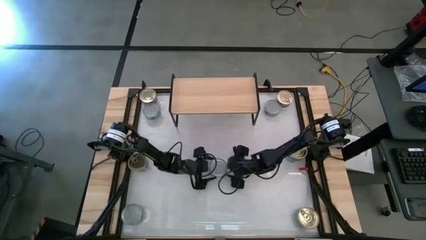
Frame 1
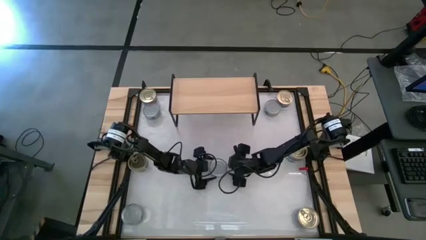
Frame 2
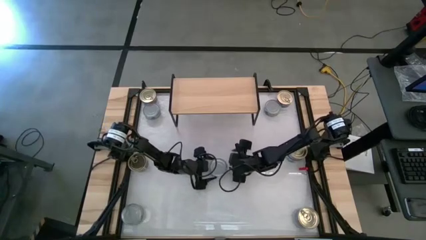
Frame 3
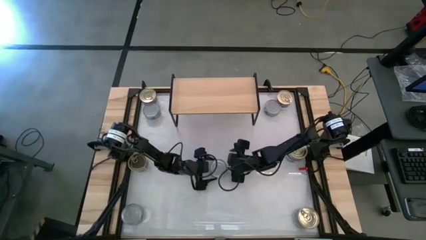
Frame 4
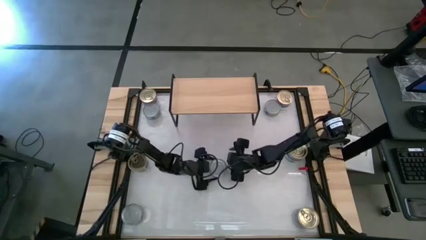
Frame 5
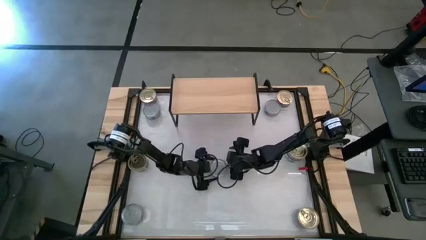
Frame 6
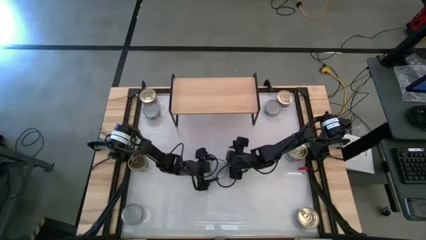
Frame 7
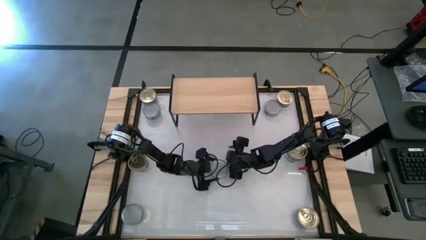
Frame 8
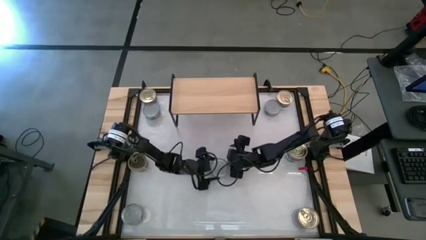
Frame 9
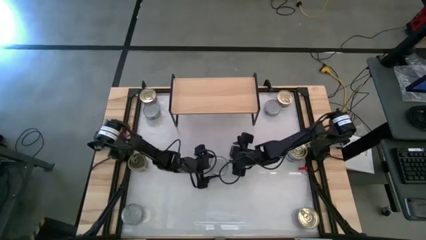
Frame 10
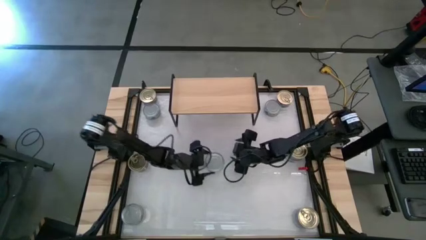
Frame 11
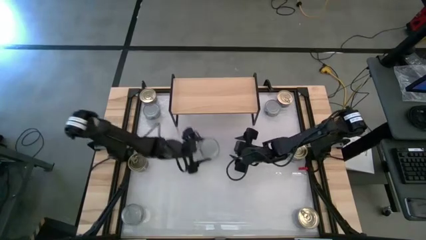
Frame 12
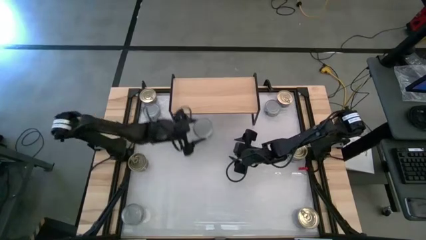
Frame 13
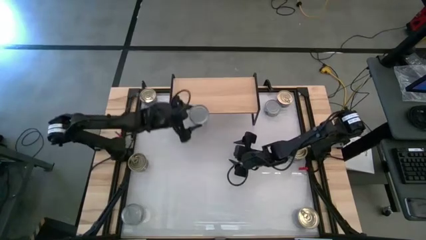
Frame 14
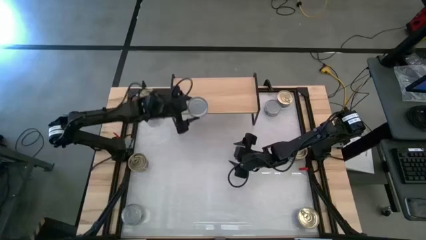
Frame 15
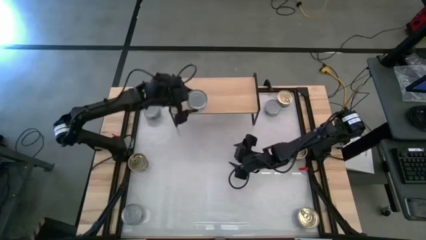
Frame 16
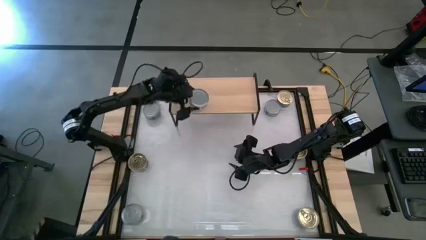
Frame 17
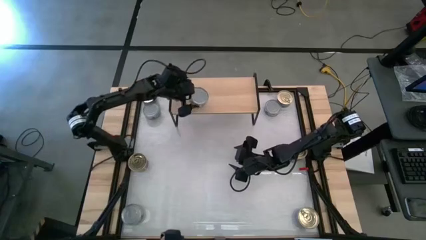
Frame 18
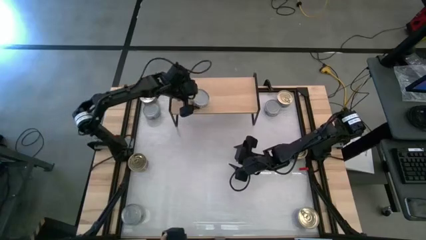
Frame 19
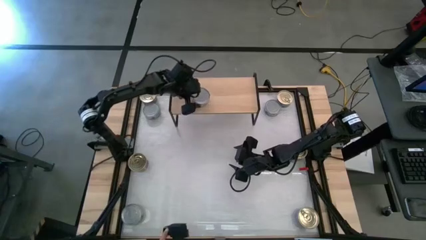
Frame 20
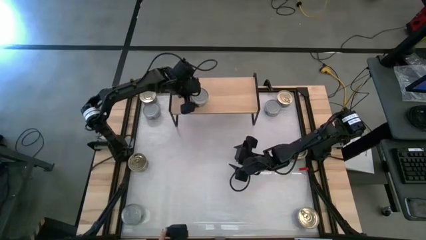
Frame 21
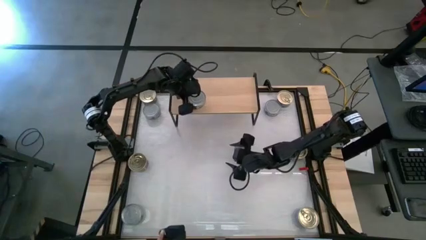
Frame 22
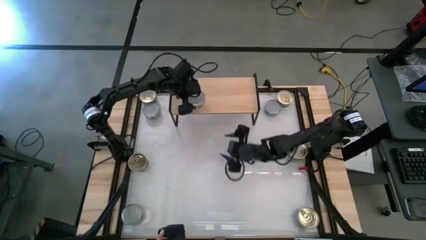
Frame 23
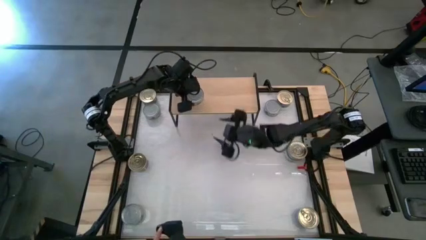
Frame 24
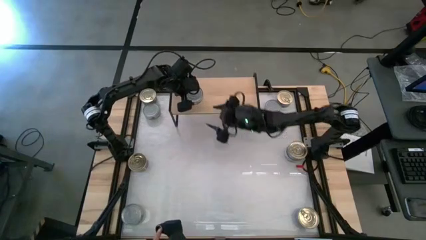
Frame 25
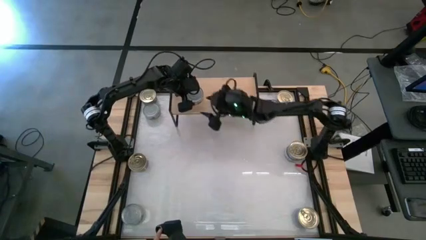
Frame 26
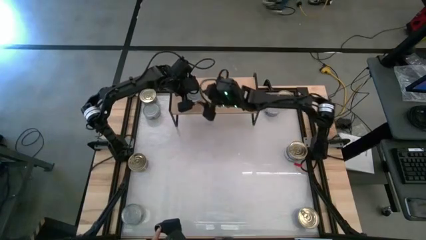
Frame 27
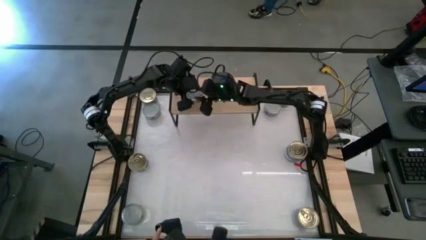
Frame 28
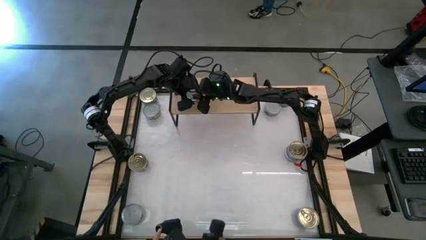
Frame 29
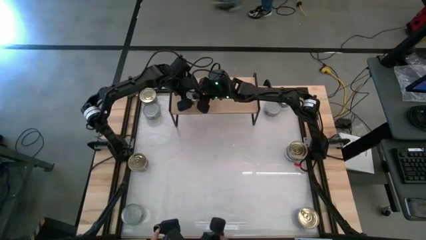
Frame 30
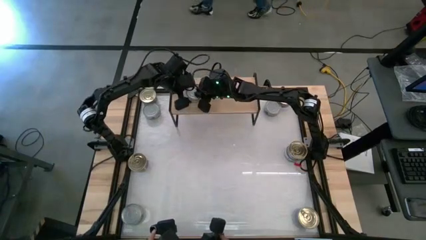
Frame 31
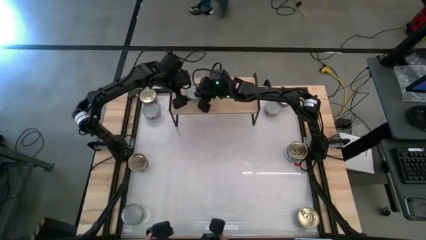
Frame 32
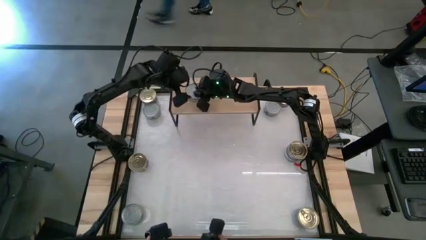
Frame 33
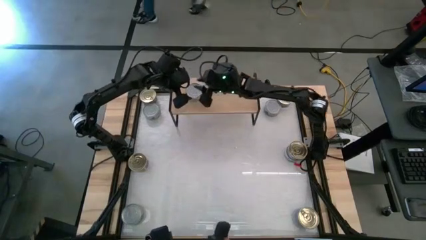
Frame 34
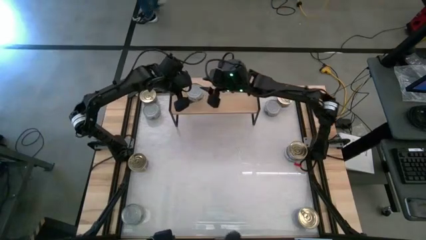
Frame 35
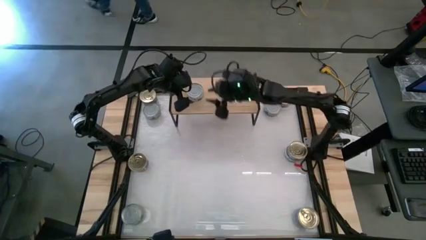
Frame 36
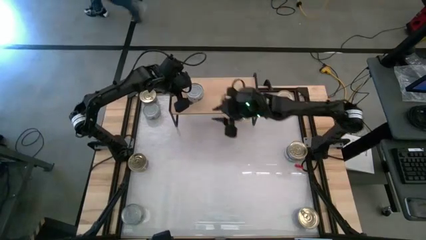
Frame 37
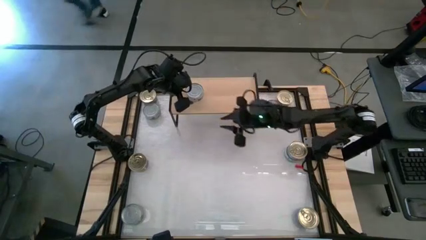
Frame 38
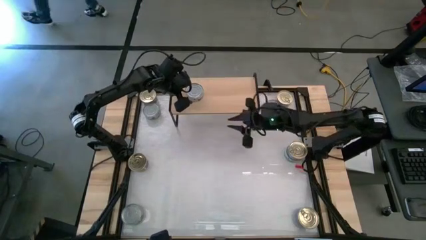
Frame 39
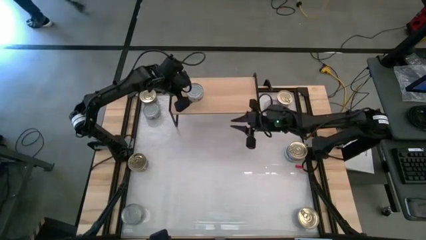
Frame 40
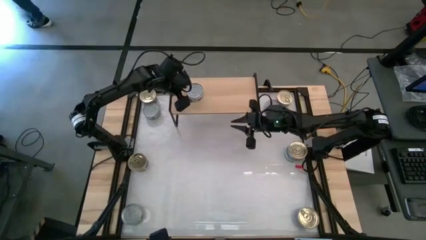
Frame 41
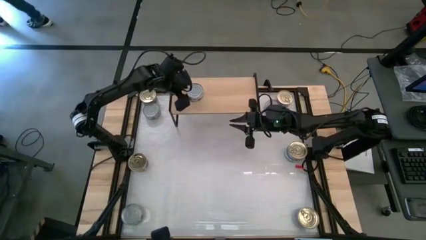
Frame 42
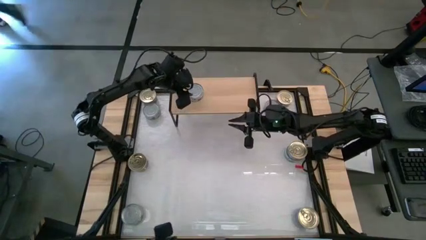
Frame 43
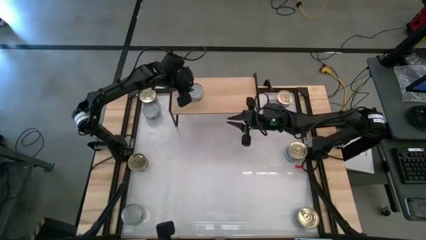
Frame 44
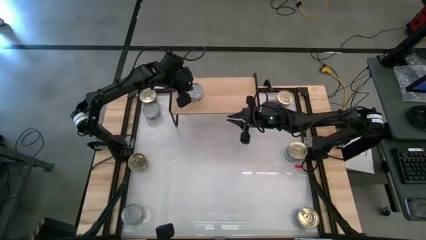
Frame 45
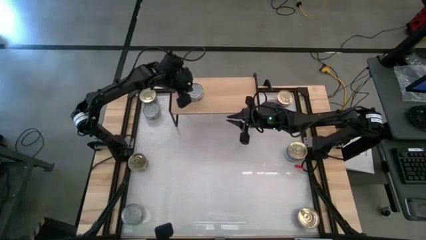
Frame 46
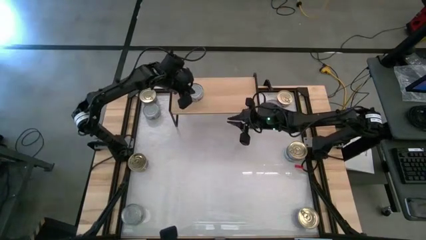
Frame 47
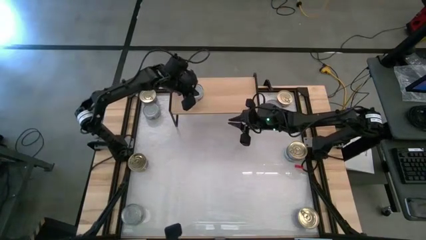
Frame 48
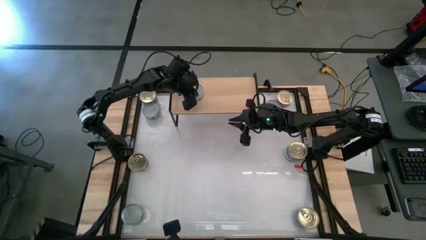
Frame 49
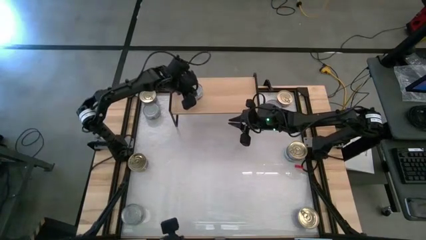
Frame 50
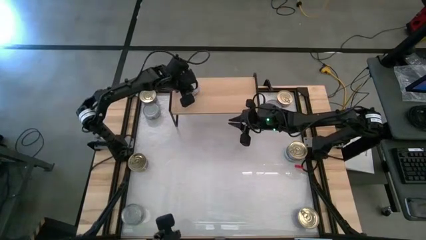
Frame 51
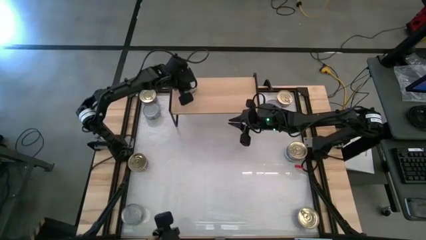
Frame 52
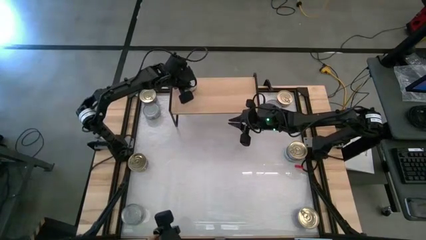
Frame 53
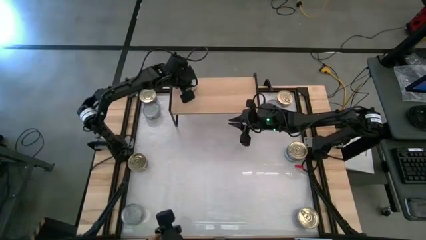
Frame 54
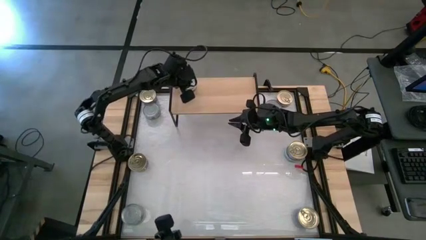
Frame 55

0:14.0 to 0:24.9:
Task: Stack canned seafood by type on shelf
Put the green tuna can on the shelf
